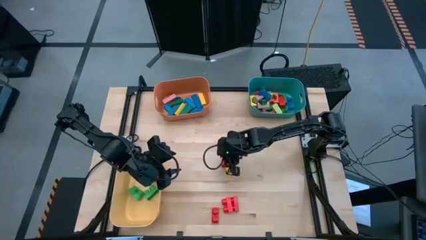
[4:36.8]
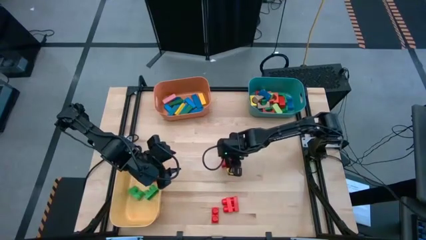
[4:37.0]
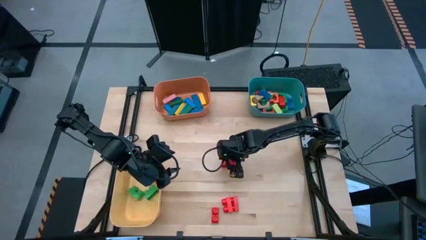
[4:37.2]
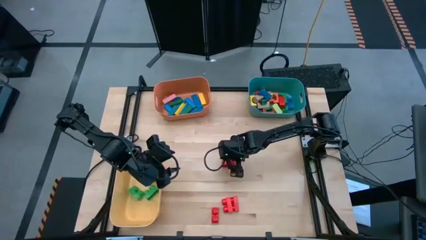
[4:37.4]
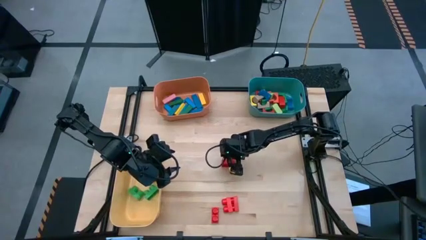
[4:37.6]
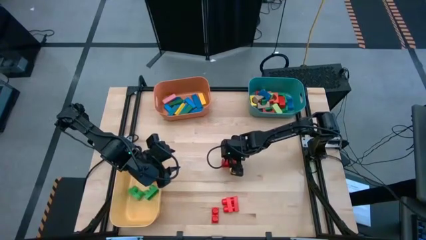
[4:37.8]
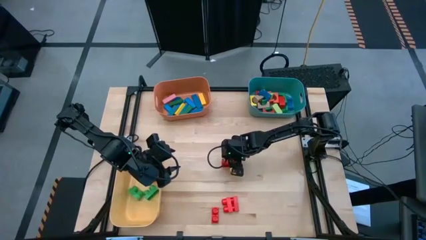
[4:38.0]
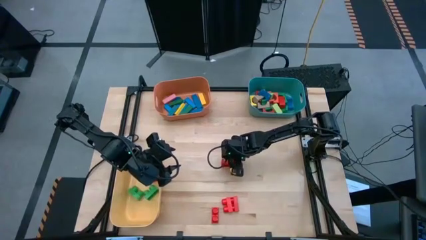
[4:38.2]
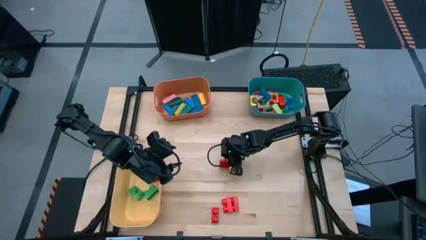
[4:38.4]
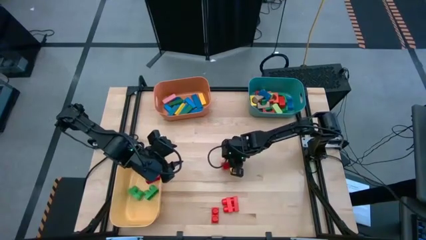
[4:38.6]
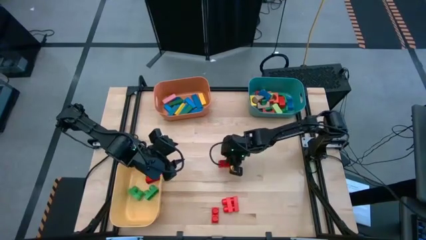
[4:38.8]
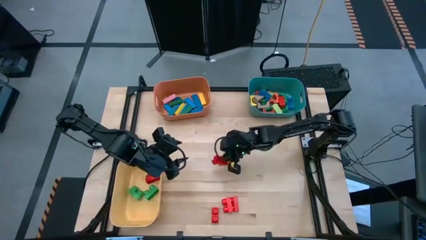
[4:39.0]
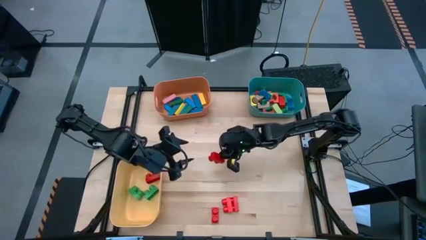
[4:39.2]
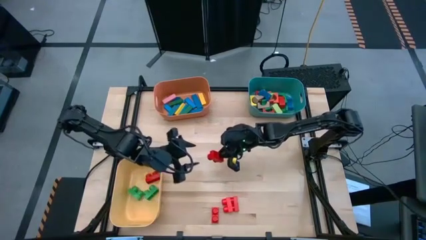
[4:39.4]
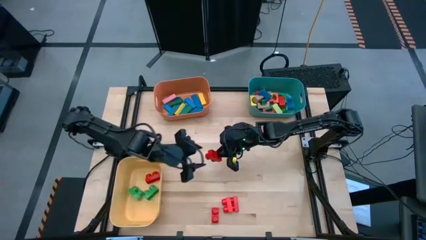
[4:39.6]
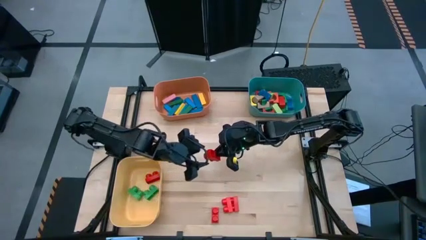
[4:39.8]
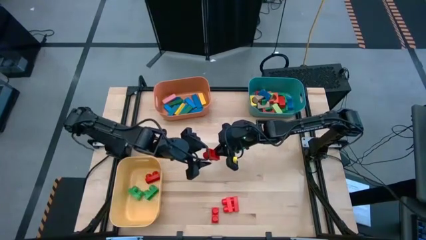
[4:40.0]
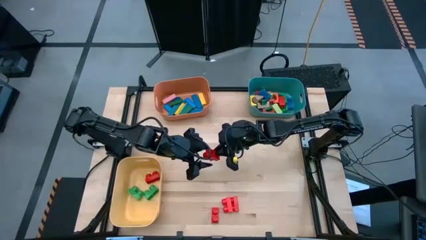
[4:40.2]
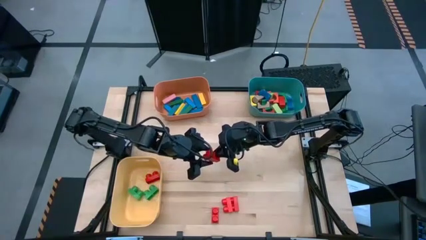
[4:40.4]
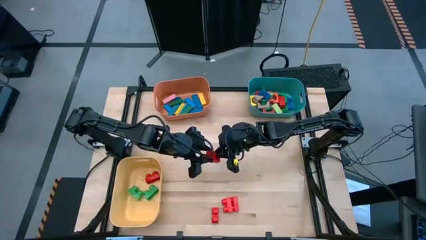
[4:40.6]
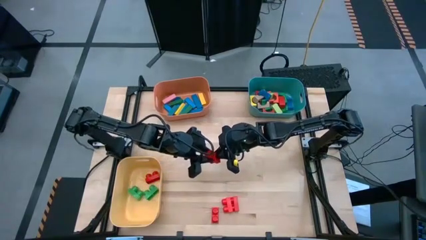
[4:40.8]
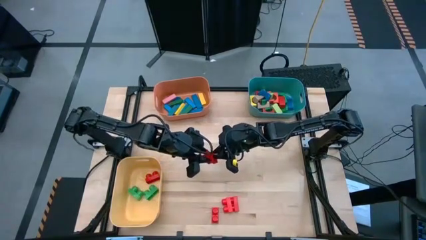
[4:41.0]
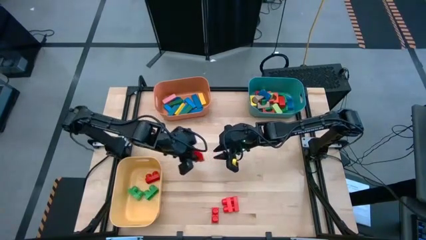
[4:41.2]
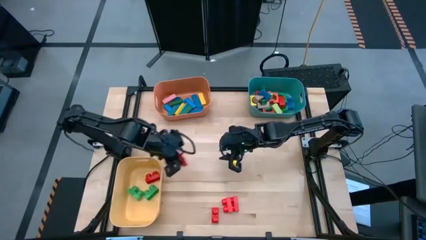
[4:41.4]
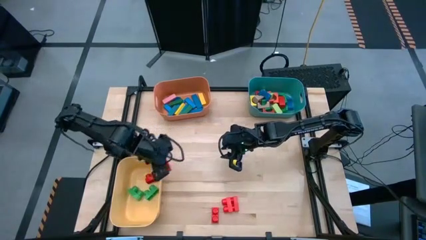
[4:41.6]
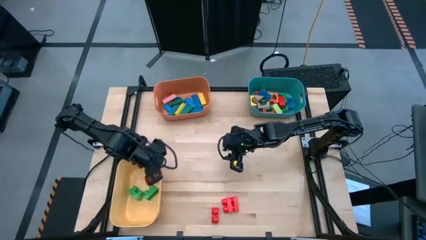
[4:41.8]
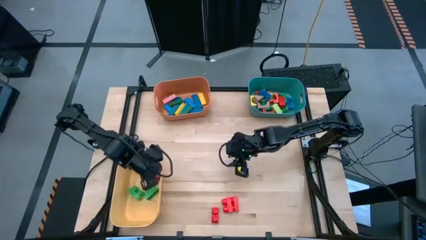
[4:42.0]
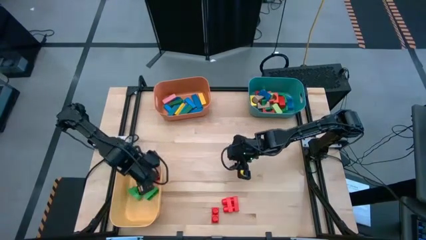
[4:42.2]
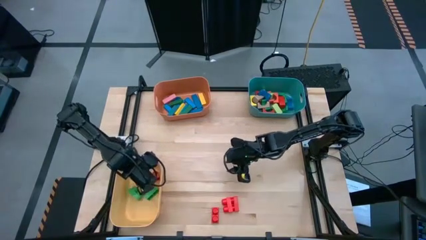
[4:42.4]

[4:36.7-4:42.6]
Task: Sort blocks by size
Put the red game piece into the yellow bin

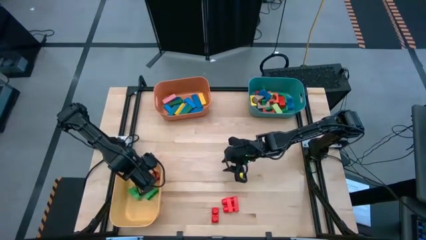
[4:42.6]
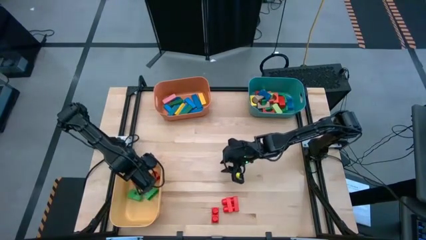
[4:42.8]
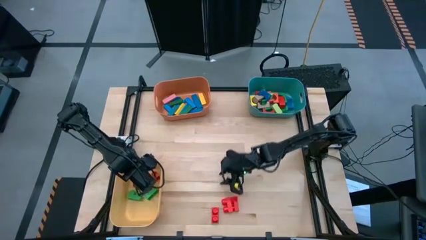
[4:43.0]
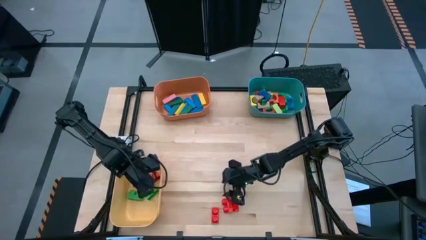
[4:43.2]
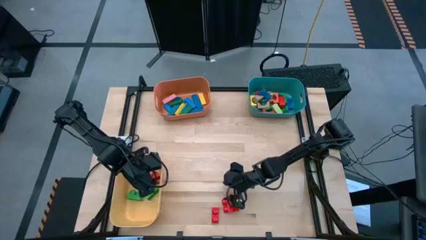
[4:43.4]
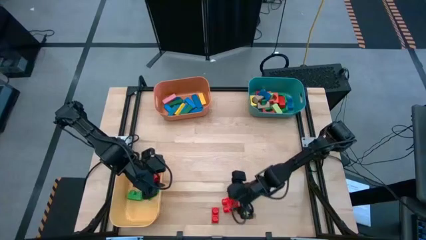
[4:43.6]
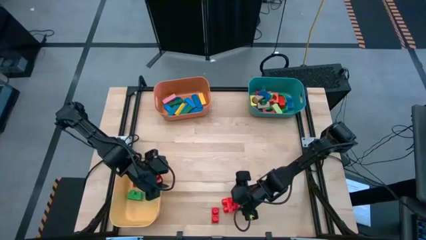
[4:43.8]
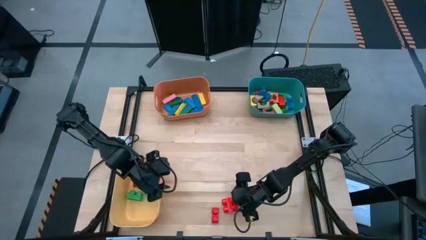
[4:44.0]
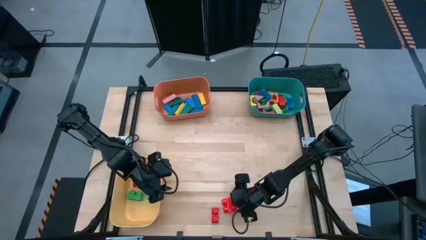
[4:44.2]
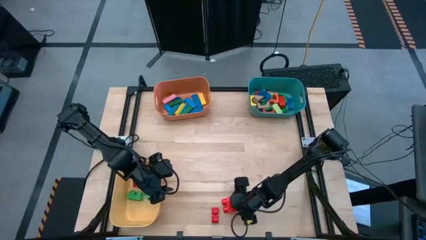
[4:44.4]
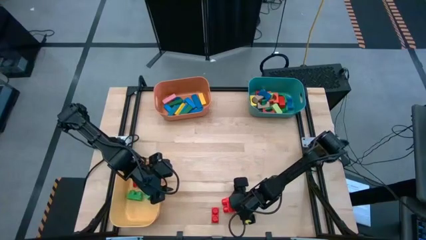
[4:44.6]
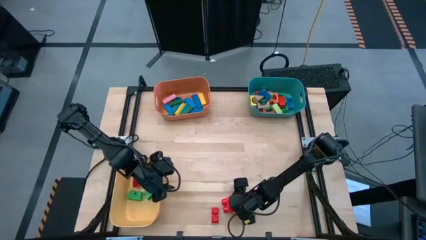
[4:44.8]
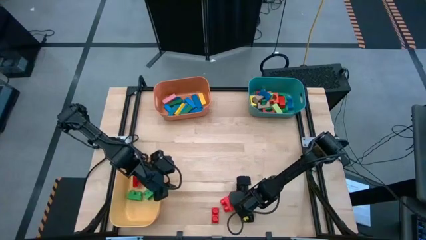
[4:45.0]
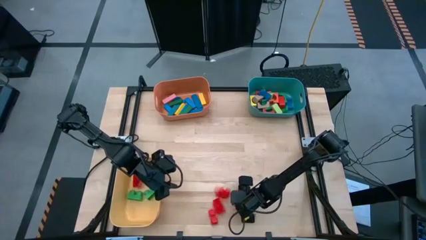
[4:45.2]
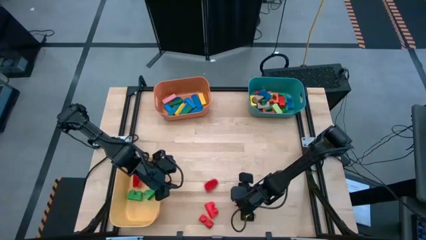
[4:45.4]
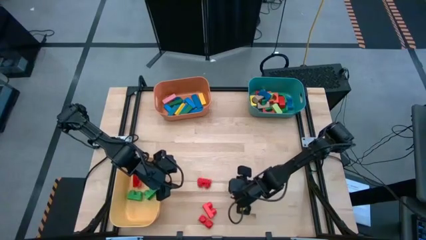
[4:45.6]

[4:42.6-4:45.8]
Put the red game piece into the yellow bin

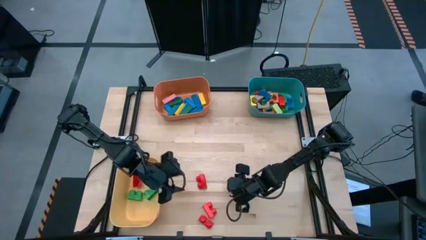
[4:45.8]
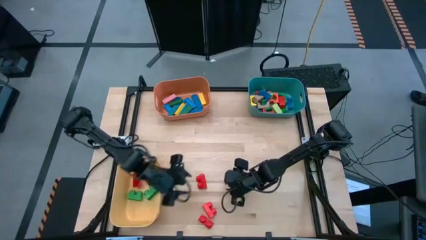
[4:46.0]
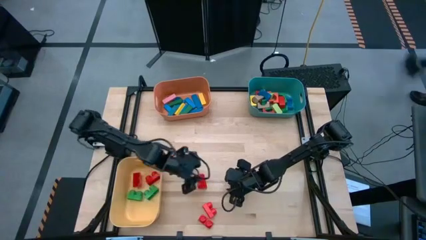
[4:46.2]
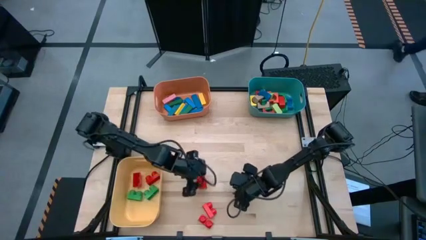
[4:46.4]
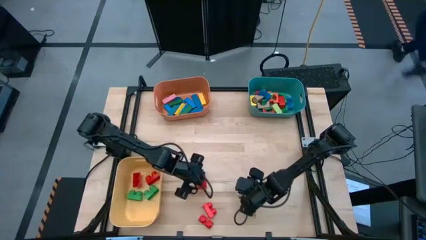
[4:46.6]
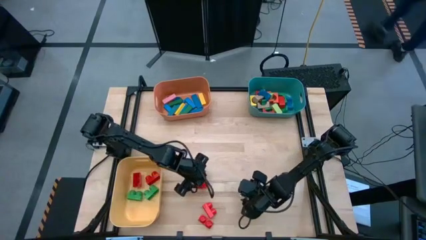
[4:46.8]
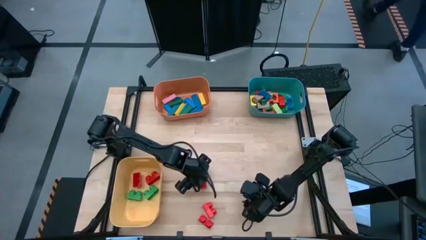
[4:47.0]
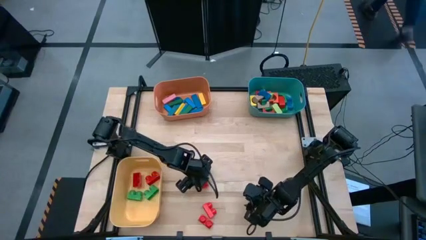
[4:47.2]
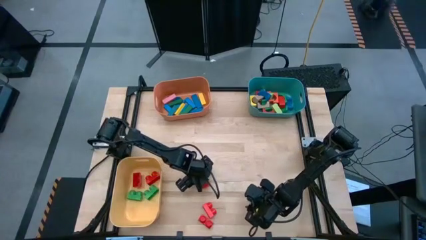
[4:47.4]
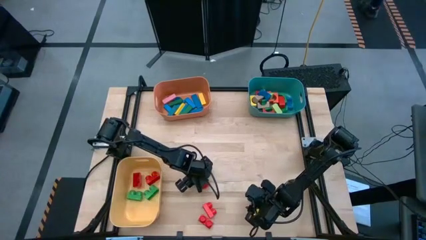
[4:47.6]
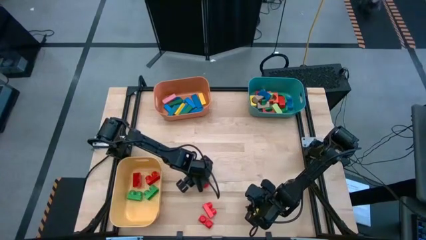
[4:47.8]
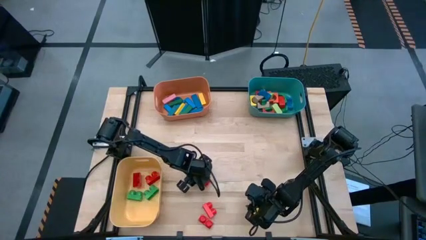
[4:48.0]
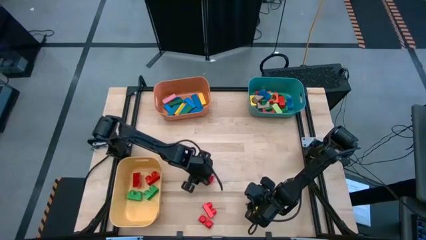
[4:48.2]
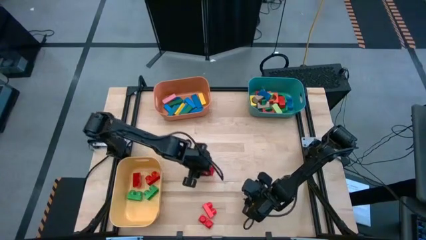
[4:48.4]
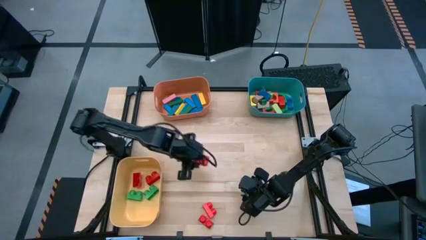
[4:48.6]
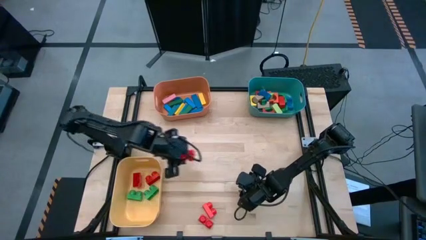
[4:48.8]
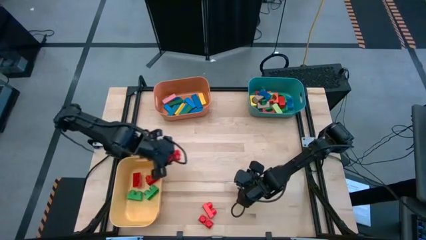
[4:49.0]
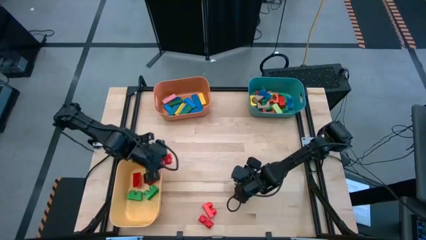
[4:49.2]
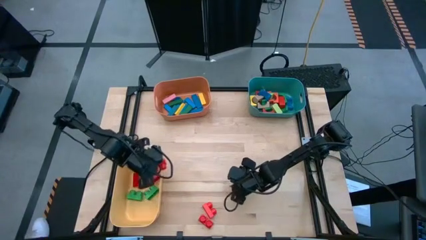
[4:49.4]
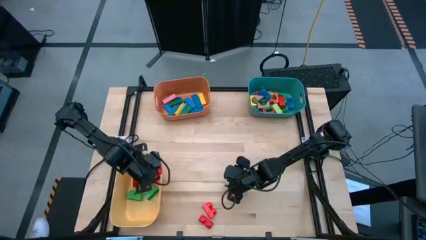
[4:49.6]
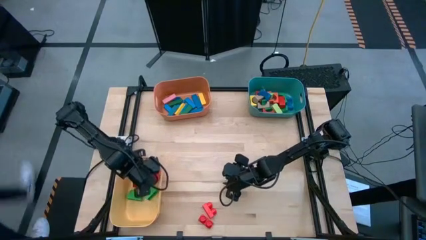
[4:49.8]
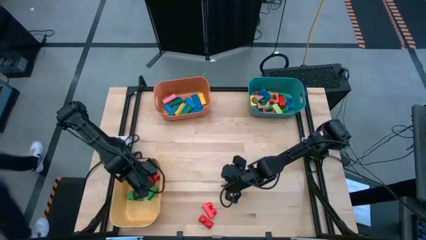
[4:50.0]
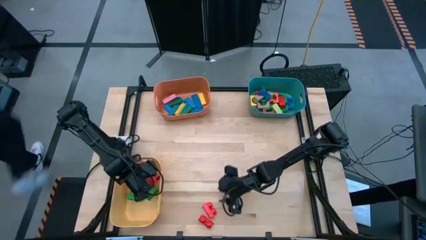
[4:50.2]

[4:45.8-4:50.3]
Put the red game piece into the yellow bin

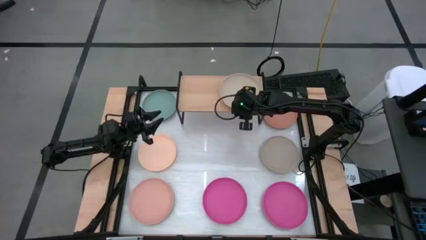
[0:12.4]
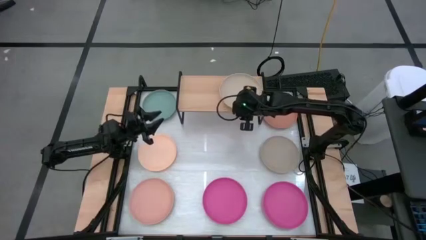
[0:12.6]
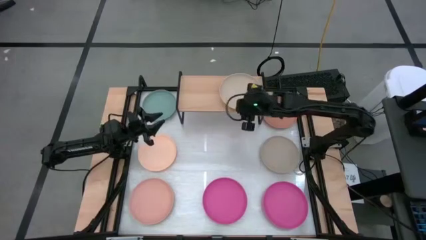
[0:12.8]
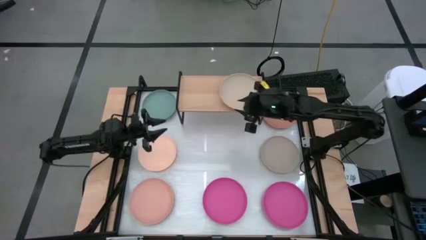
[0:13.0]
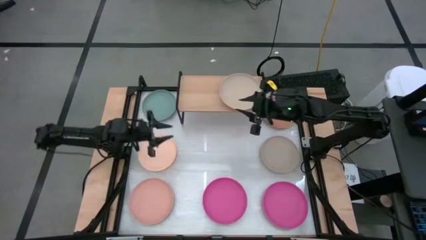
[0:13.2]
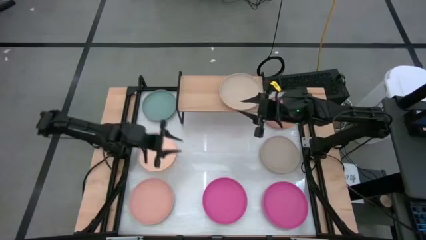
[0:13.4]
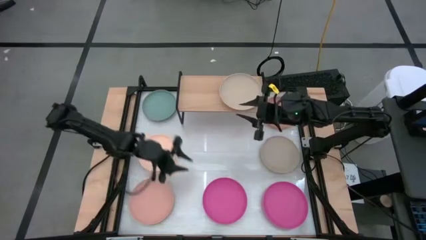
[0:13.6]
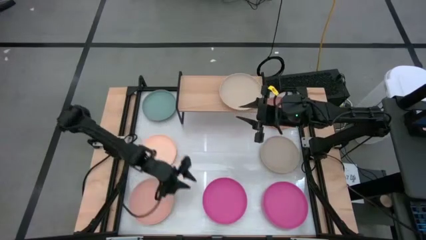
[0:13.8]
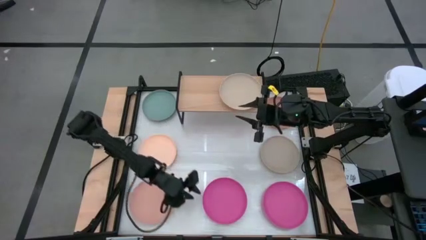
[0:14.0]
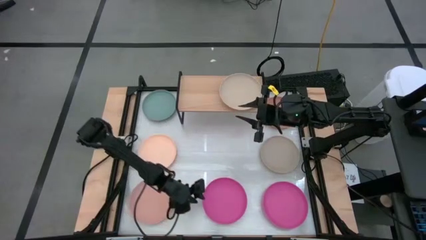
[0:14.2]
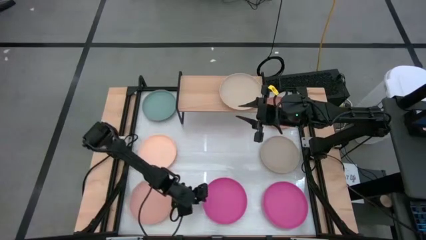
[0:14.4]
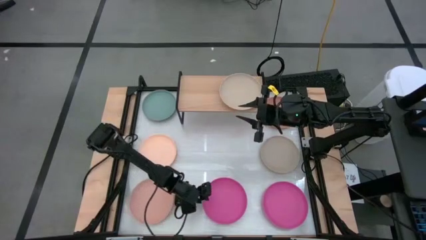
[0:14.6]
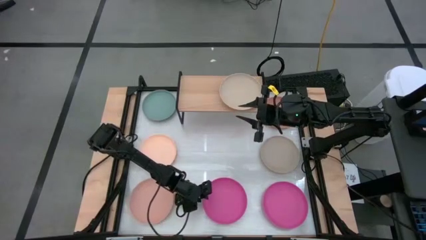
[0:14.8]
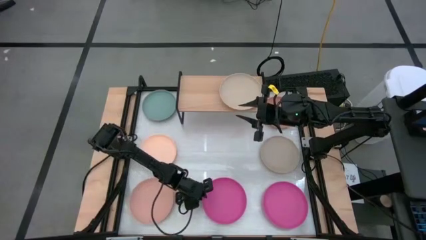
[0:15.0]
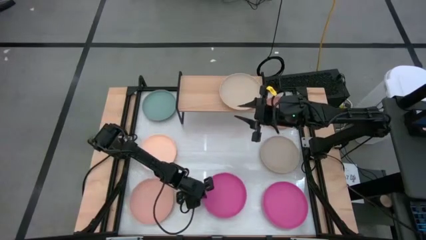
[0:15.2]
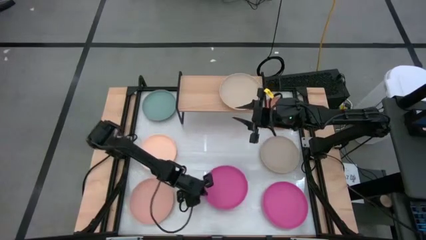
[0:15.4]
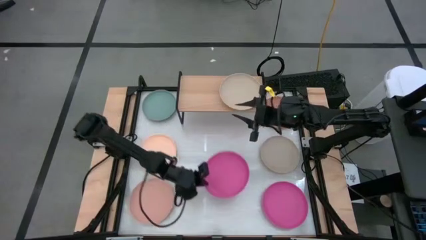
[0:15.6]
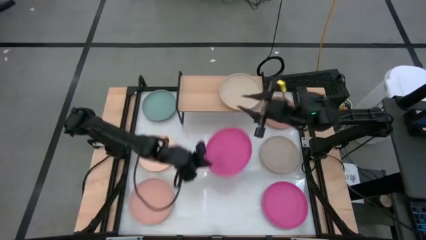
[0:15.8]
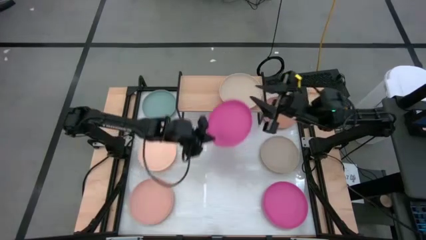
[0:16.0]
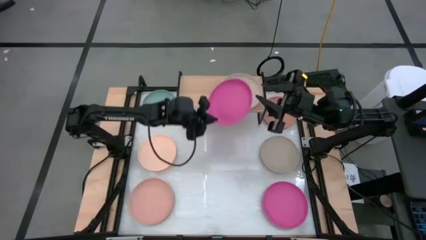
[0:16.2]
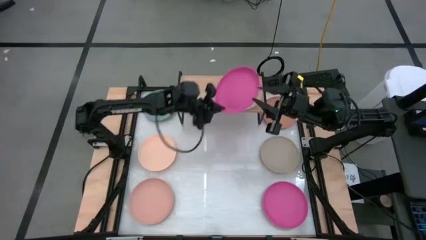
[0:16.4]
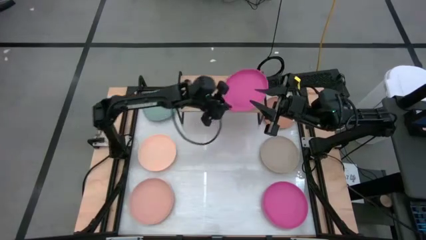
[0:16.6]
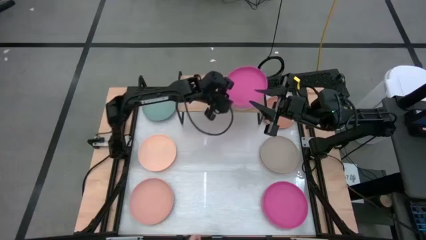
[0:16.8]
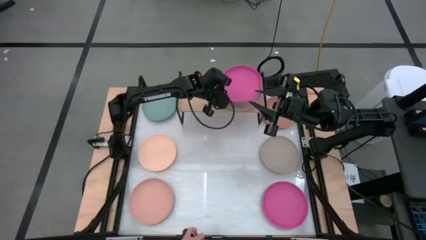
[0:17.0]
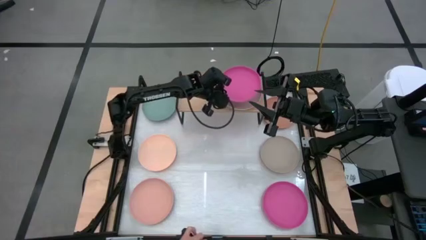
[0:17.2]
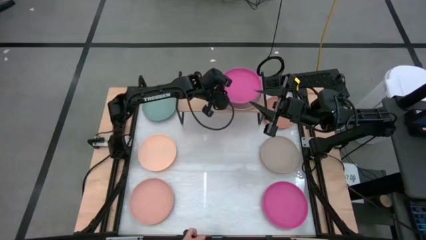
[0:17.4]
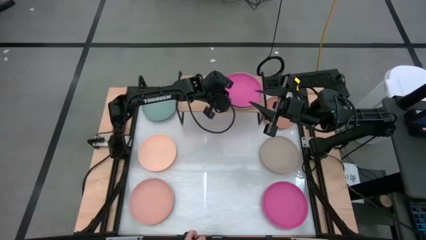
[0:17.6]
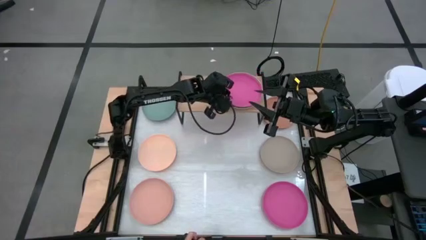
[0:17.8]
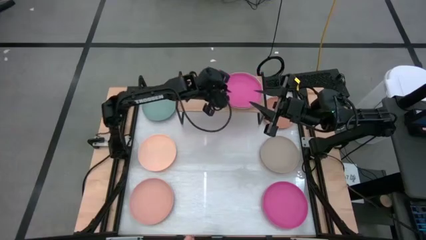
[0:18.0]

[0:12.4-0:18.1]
Task: Place and stack plates onto a shelf
Stack the right pink plate on top of the light brown plate on the shelf
